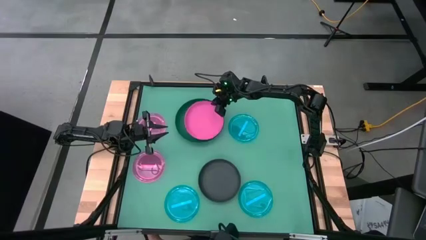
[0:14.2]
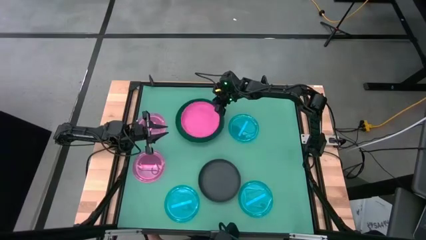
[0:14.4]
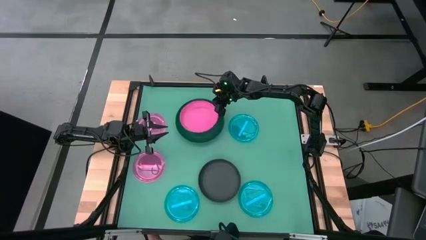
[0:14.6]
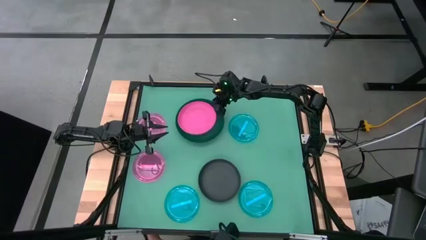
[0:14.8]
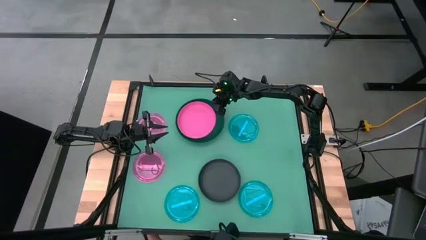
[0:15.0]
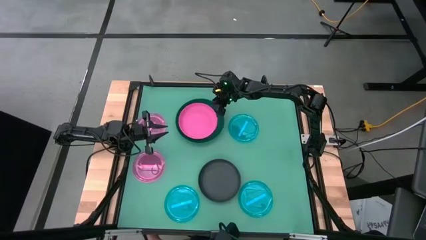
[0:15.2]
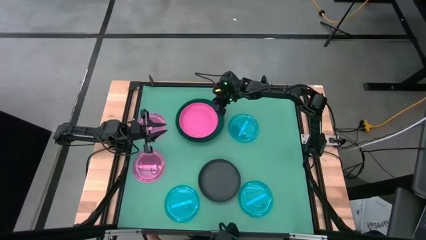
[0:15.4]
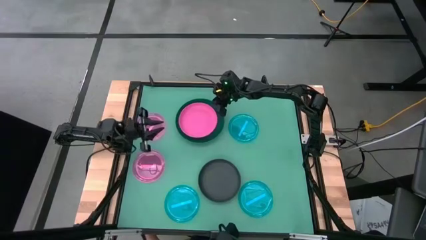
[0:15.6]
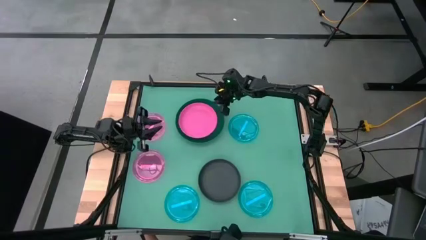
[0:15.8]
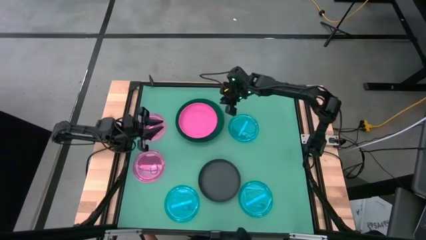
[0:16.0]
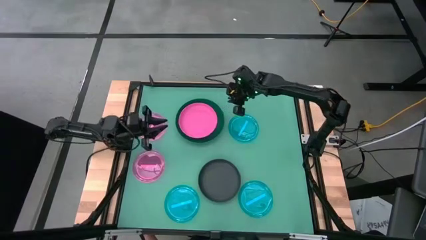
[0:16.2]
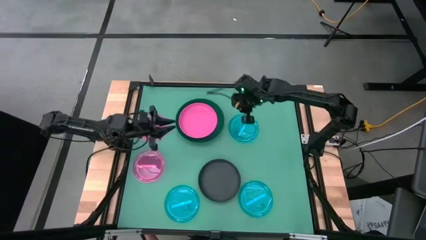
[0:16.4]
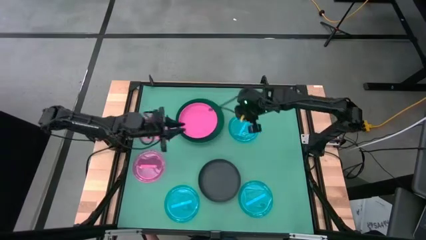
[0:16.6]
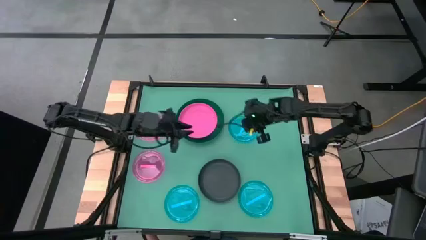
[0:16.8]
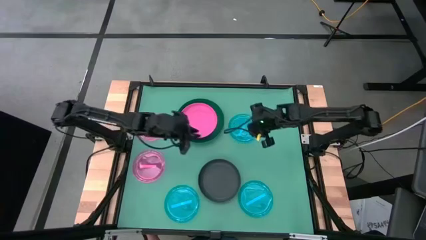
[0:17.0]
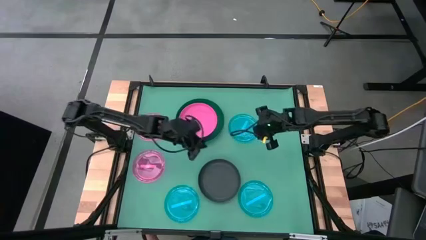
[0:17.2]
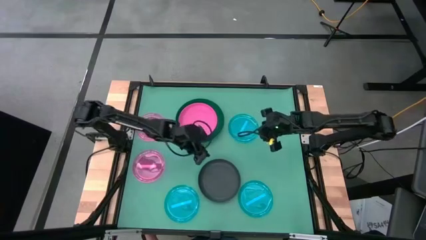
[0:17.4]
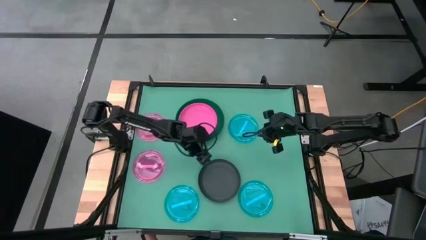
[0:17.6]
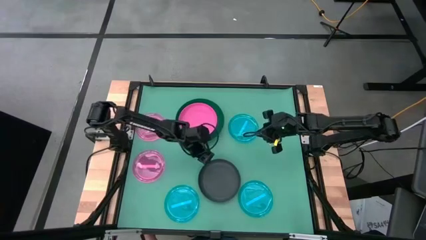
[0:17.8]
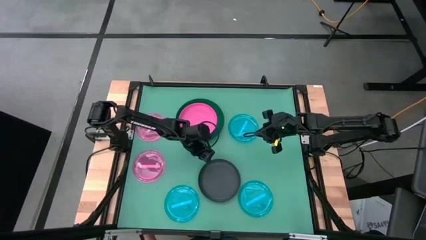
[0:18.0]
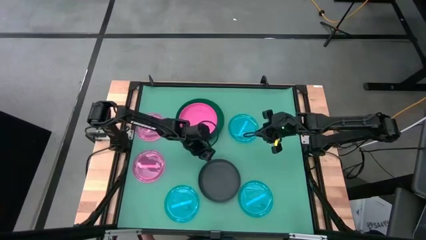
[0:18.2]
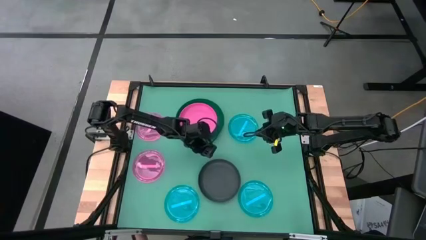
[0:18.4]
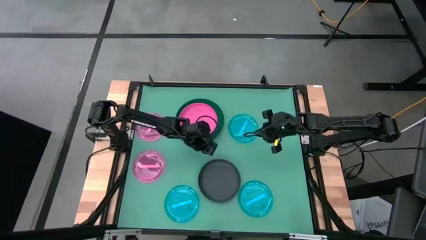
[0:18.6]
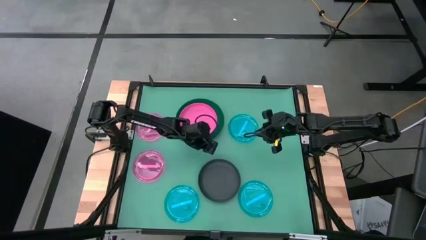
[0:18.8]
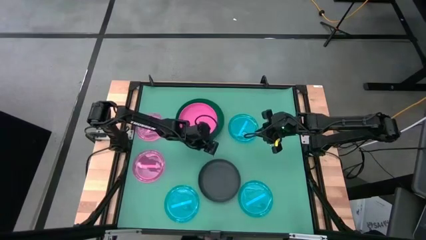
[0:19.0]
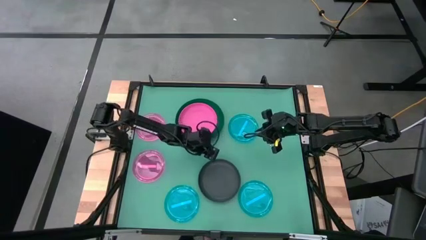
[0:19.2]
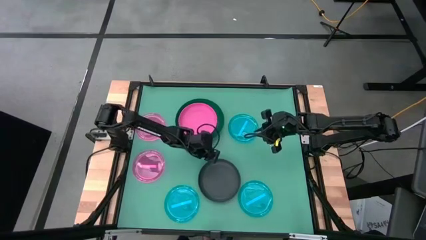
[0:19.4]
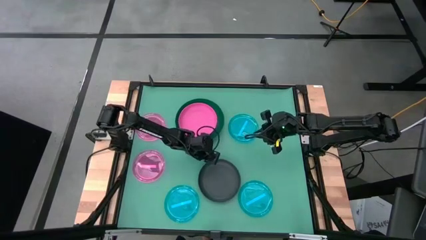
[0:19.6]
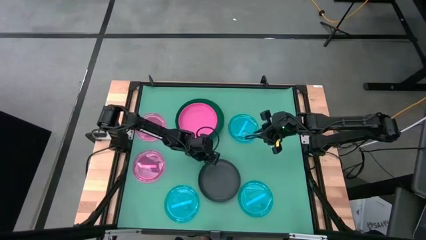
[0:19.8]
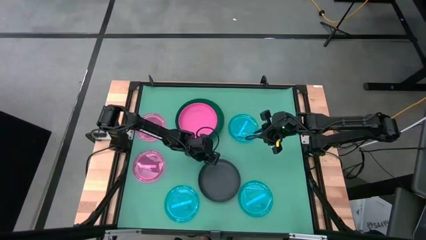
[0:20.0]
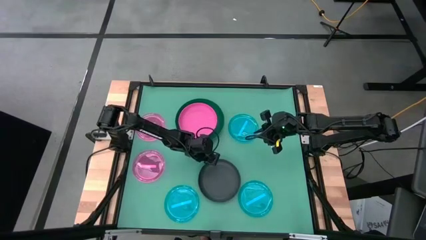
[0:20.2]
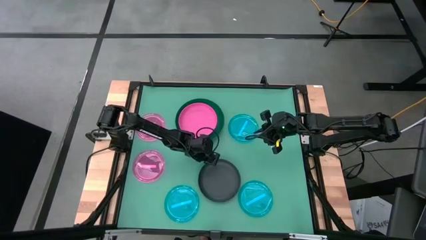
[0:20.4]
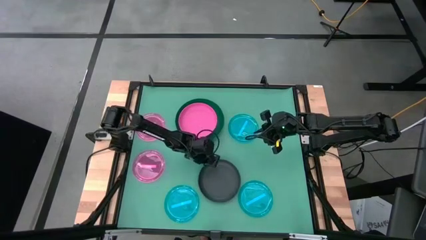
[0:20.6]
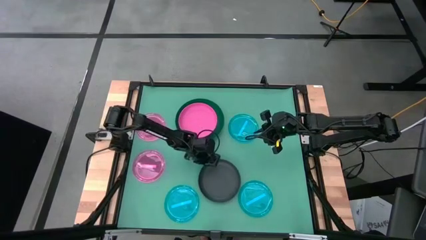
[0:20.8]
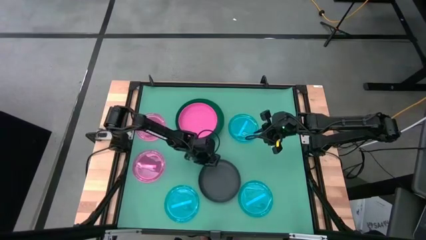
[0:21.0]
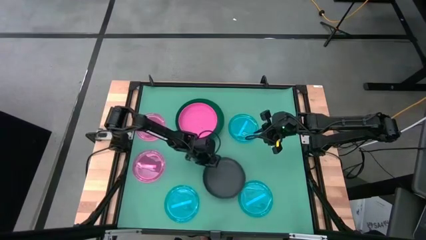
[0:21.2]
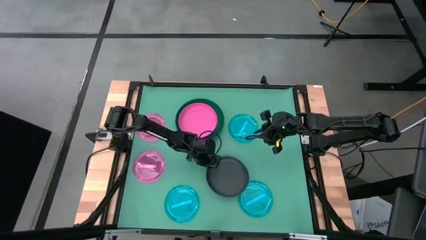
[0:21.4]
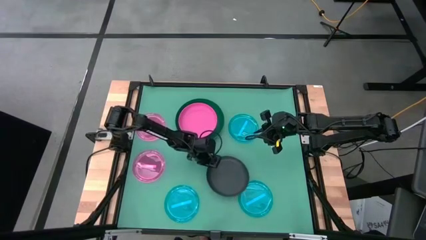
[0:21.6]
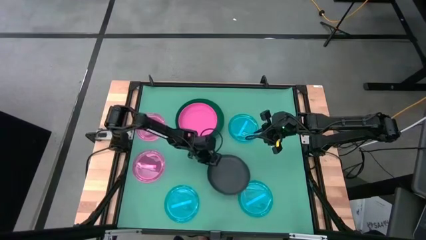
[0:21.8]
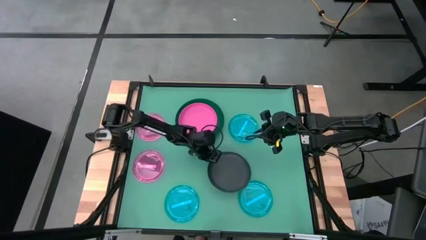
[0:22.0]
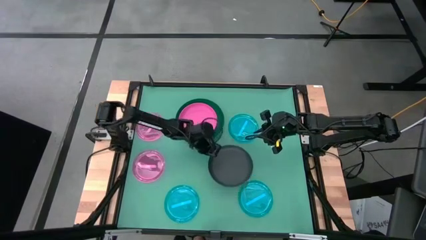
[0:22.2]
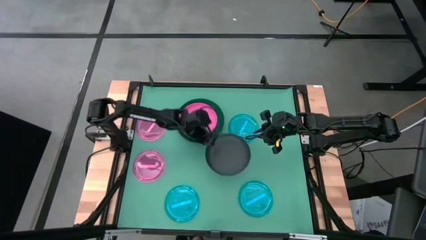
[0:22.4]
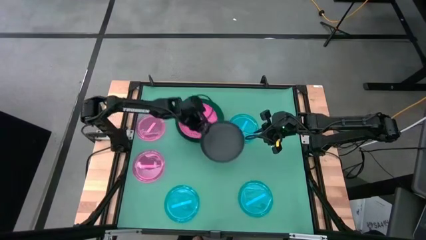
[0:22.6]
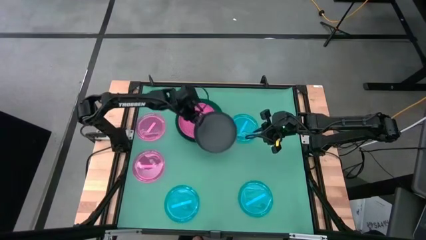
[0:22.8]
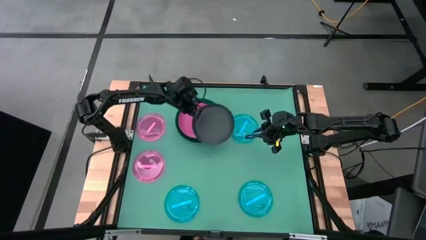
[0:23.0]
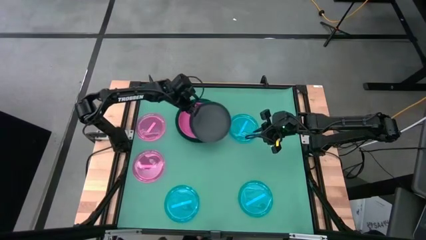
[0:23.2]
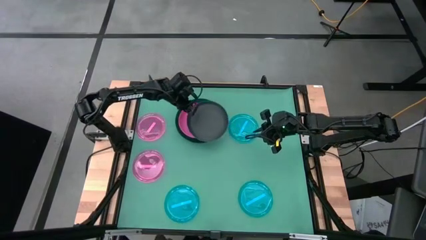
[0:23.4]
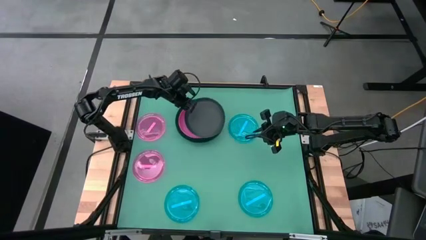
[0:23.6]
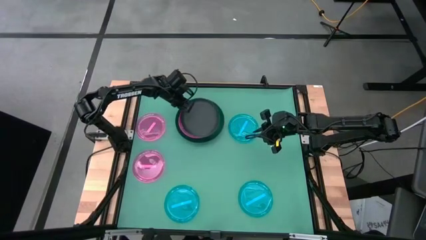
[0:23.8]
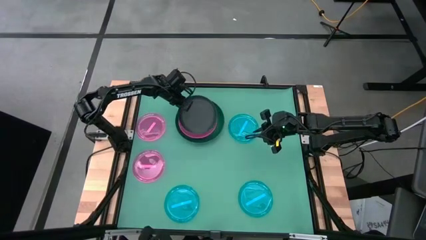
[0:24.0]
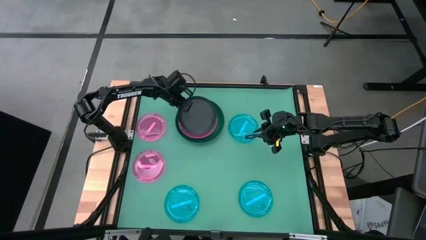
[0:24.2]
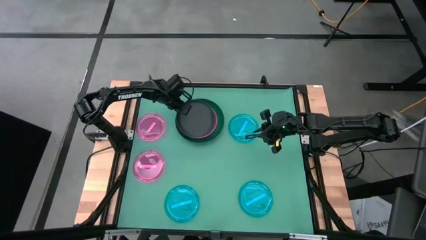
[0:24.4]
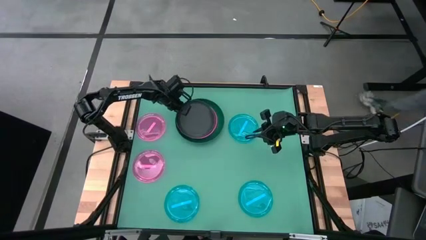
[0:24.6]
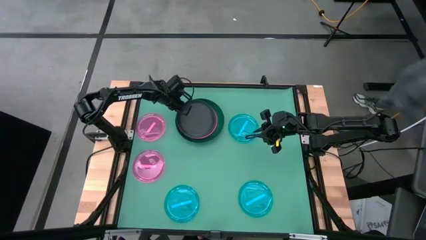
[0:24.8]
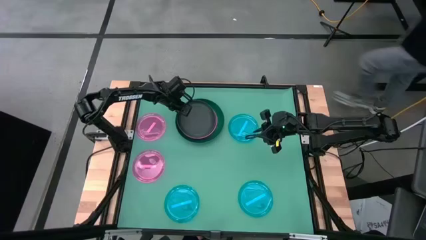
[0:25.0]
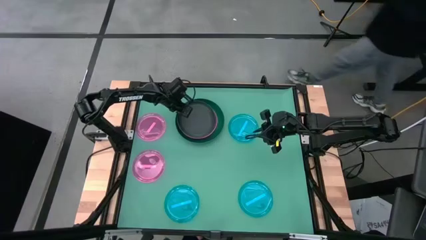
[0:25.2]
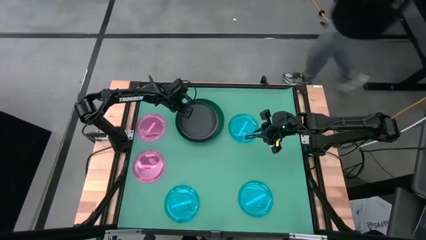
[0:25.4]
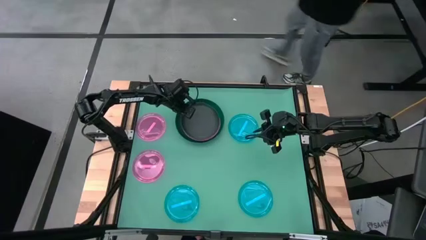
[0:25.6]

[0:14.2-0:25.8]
Task: Stack plastic plates
Stack the black plate on top of the pink plate
